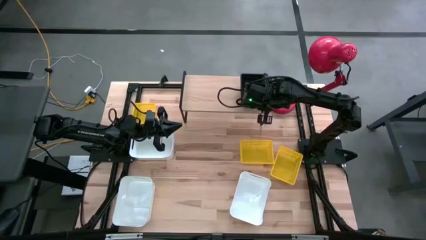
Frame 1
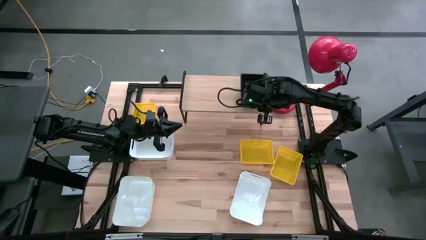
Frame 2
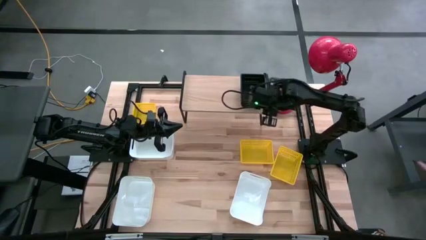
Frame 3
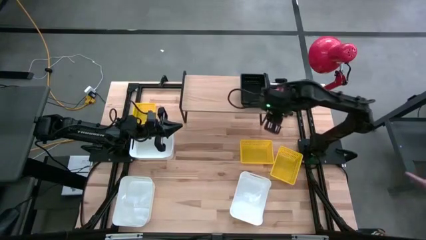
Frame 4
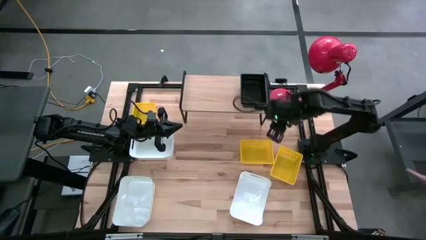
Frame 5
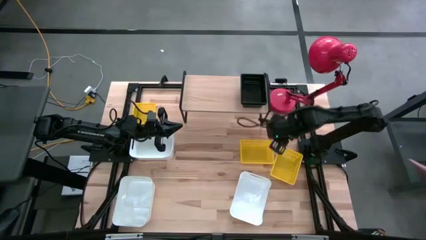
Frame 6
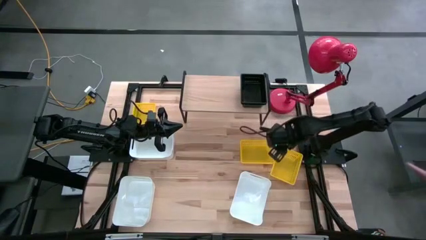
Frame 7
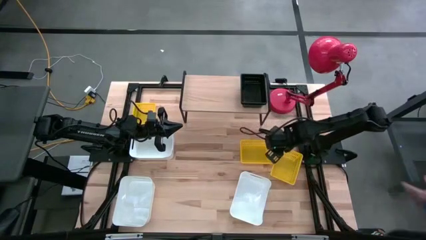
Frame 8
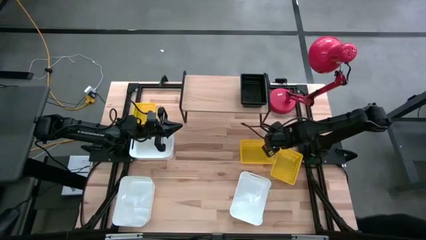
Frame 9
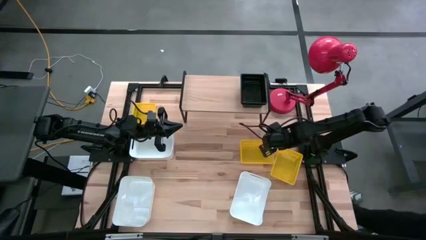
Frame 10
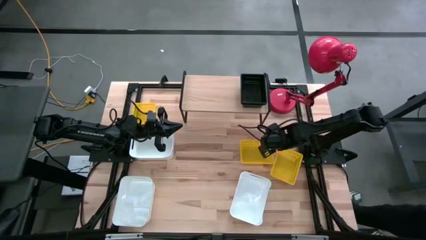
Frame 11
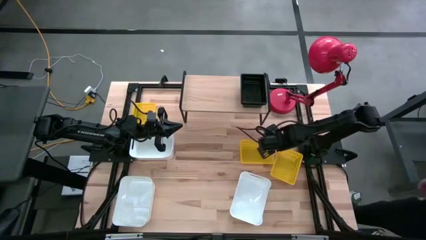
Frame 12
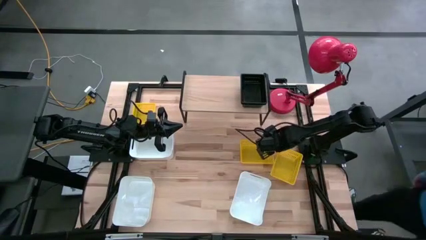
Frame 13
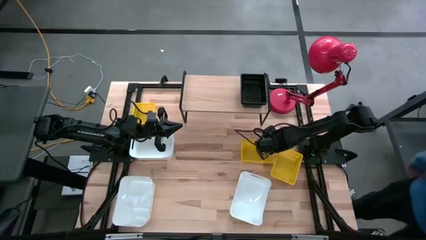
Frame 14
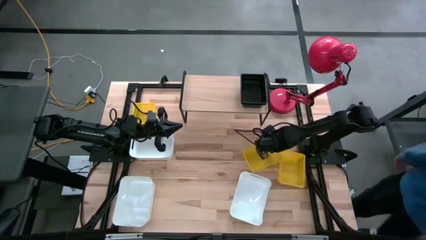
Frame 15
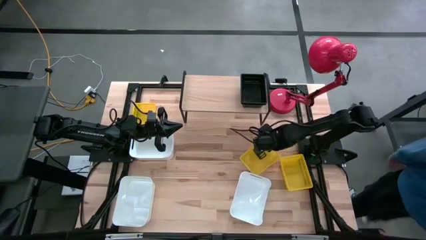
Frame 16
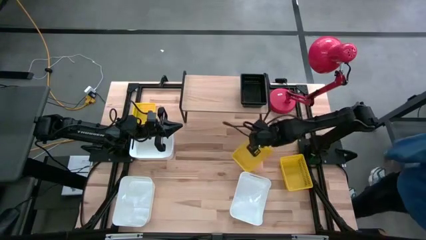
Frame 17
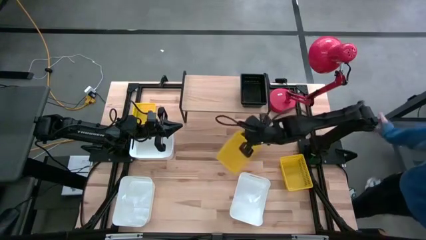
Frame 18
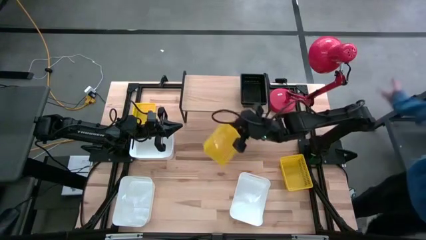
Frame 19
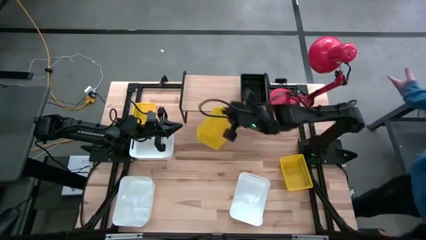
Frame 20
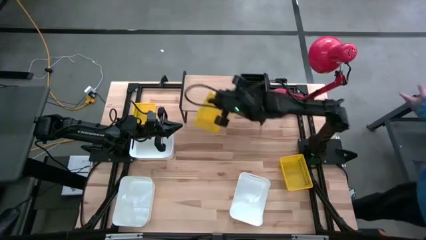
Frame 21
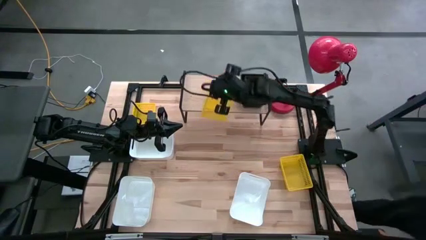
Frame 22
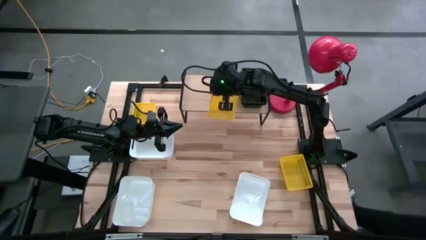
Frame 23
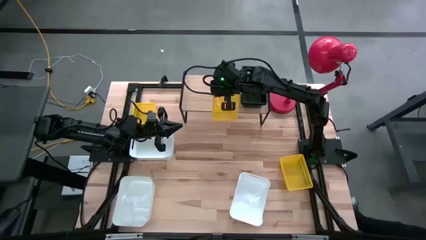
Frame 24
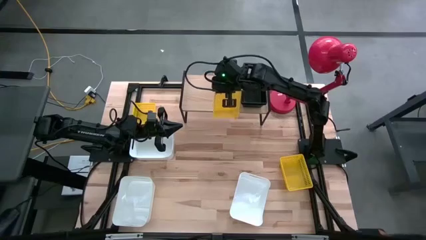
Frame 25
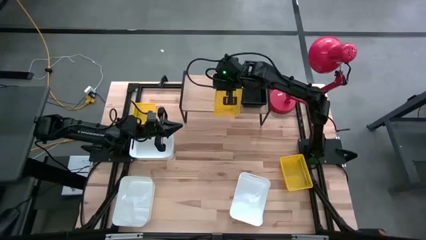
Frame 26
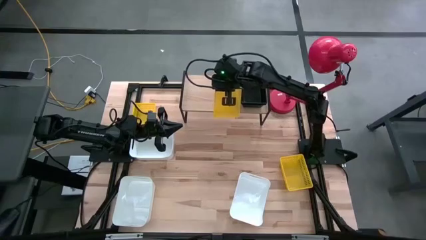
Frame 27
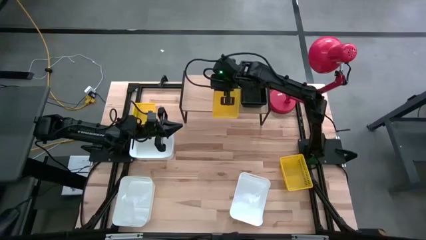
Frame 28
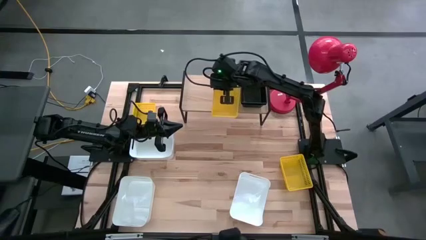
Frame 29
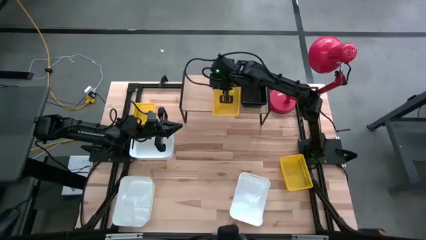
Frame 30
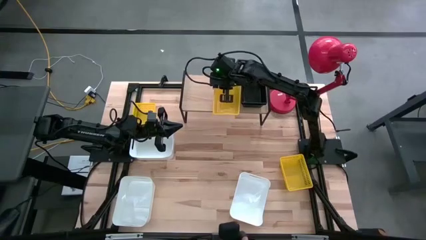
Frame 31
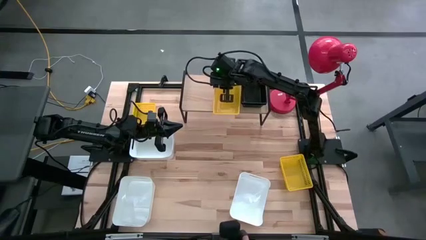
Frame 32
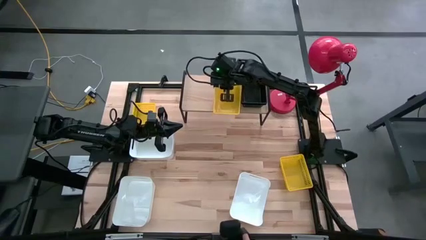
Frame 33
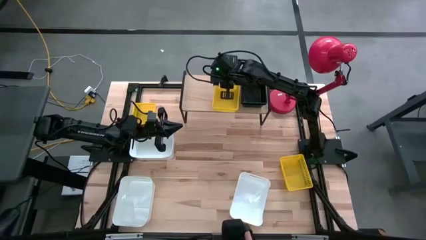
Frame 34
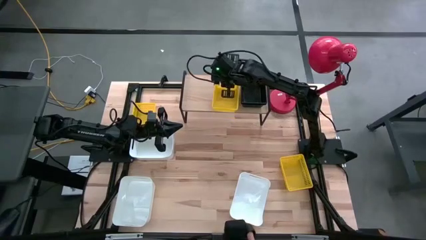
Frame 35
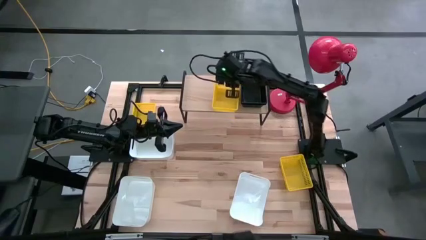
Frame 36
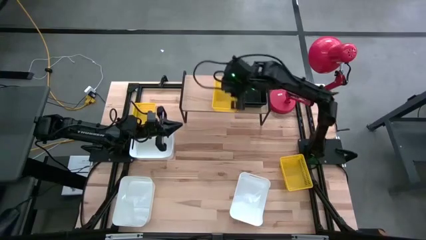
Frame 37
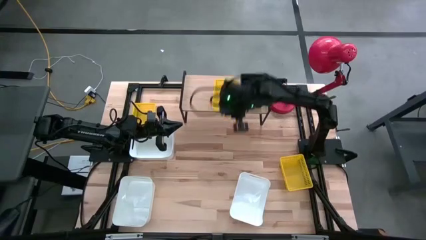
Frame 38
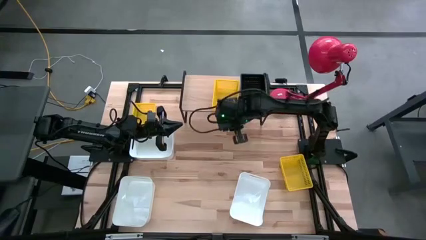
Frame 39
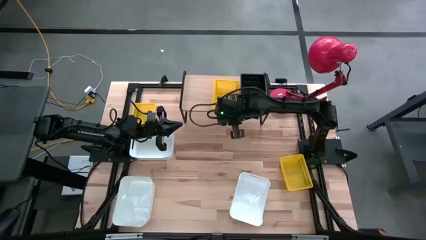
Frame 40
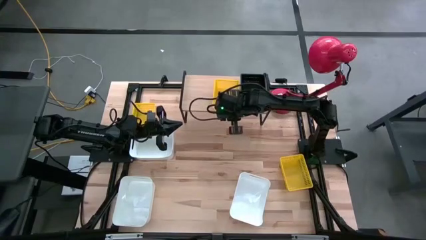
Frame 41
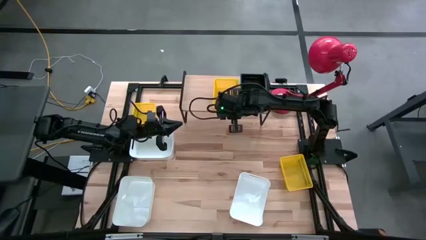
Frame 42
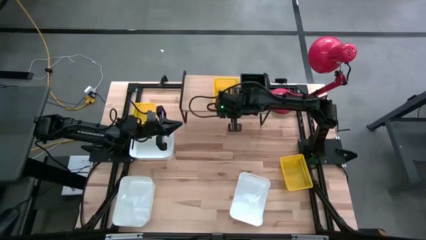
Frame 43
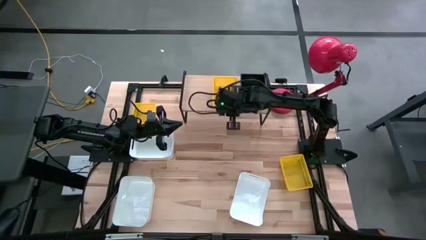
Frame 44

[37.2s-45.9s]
Task: Stack baskets on shelf by color
Put the middle yellow bin on the shelf

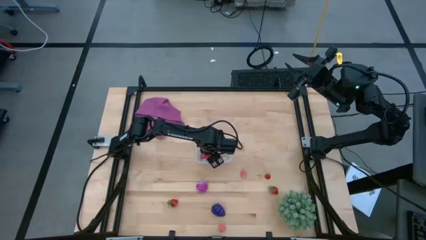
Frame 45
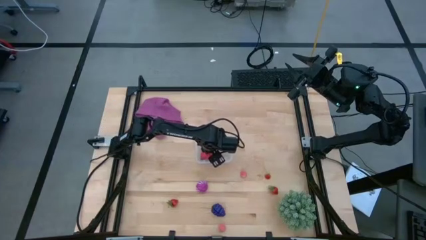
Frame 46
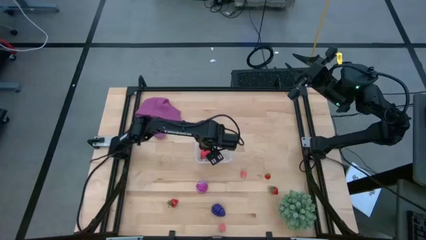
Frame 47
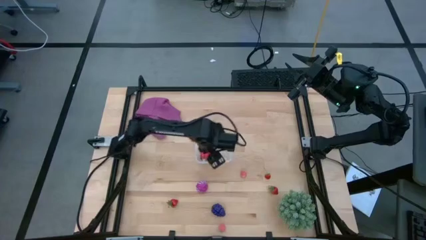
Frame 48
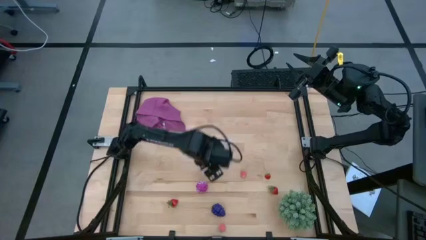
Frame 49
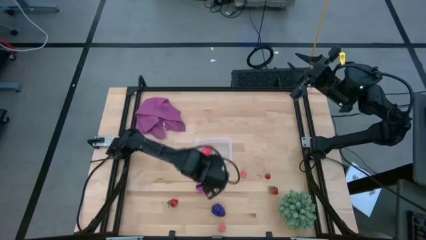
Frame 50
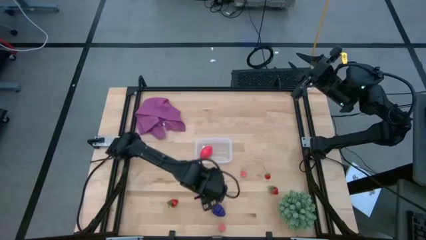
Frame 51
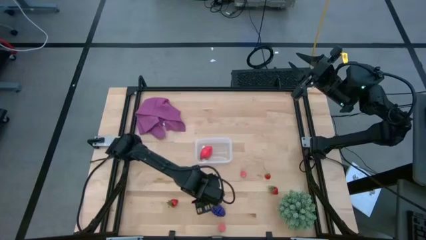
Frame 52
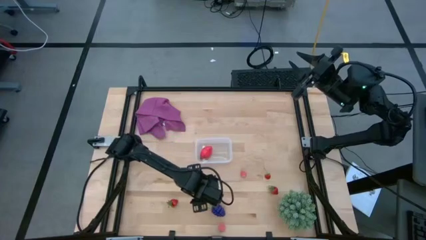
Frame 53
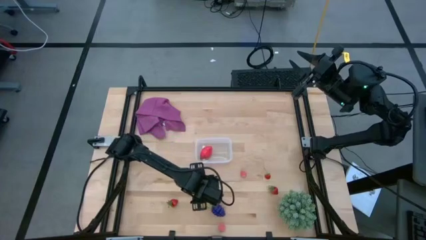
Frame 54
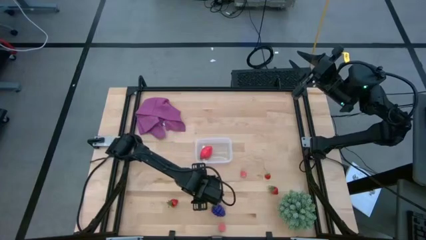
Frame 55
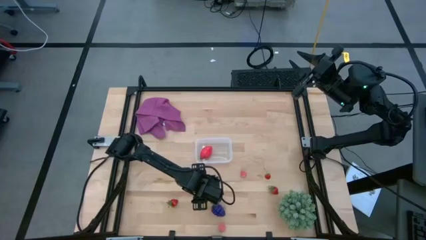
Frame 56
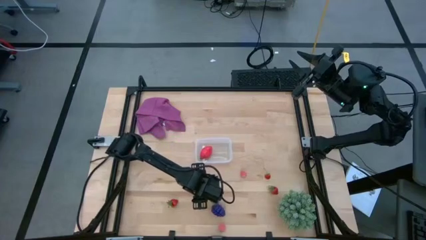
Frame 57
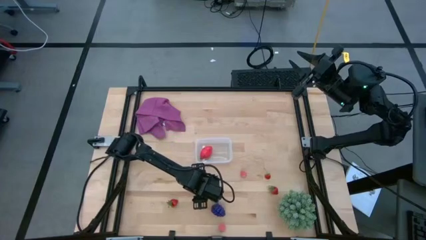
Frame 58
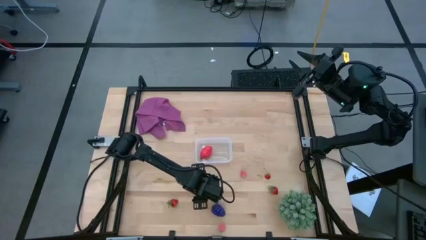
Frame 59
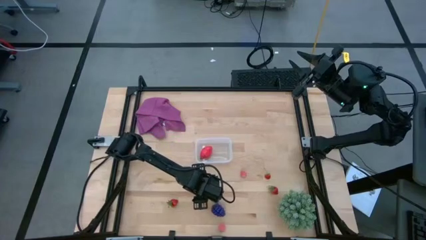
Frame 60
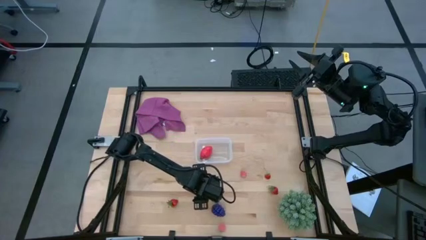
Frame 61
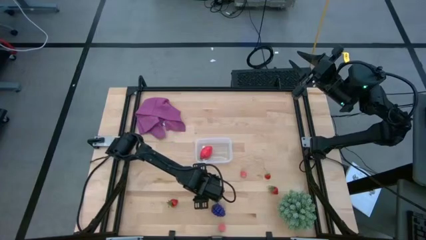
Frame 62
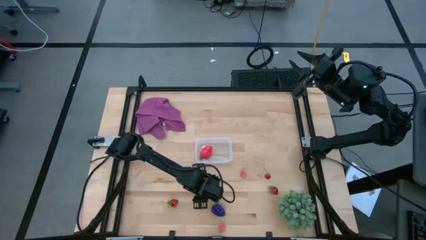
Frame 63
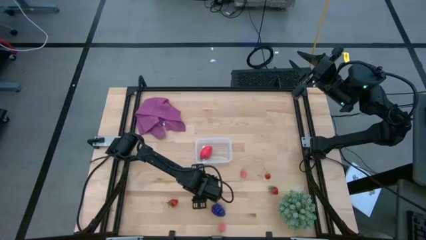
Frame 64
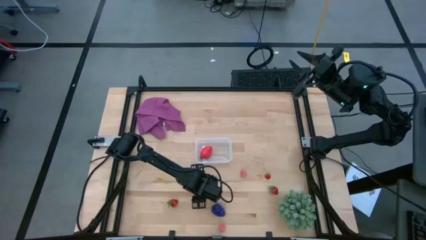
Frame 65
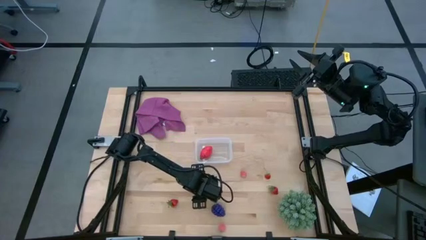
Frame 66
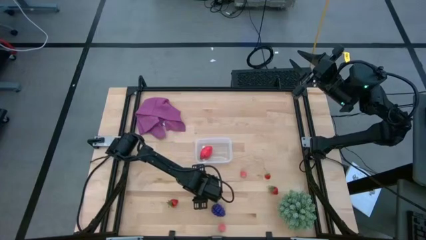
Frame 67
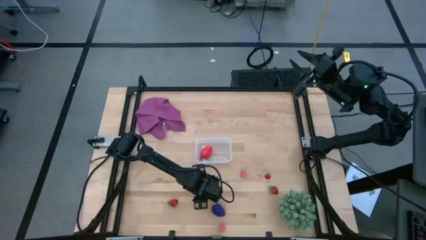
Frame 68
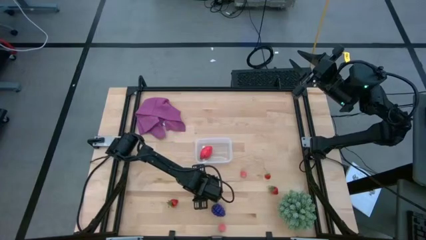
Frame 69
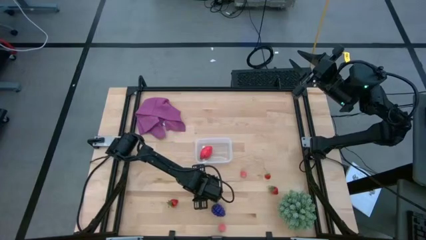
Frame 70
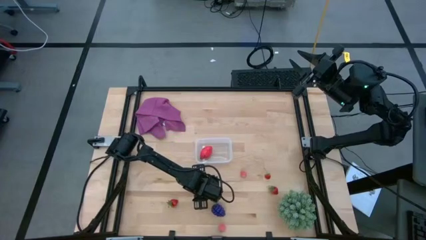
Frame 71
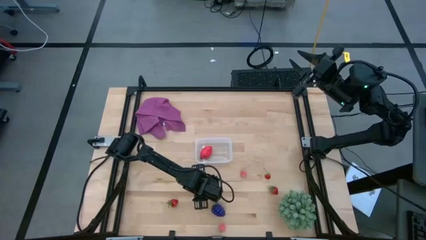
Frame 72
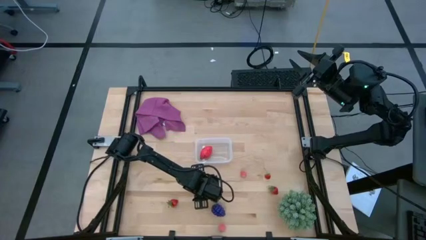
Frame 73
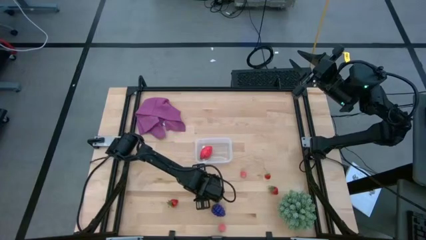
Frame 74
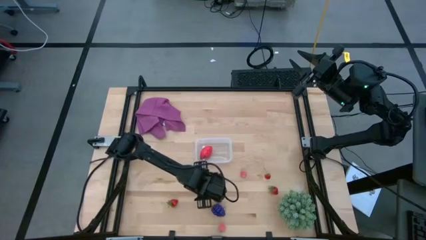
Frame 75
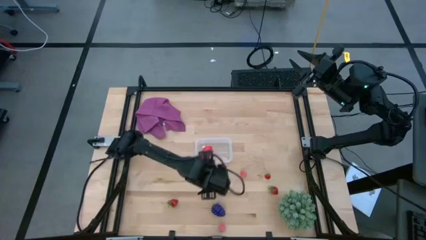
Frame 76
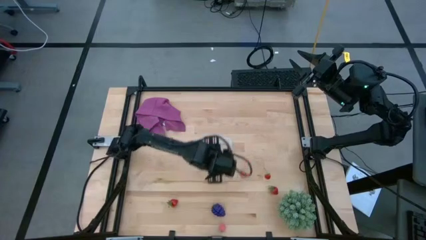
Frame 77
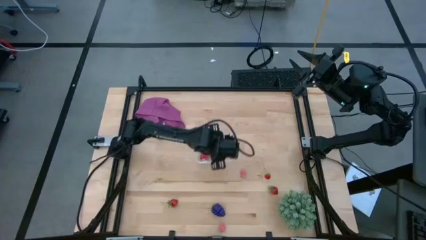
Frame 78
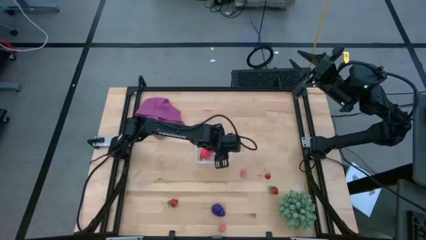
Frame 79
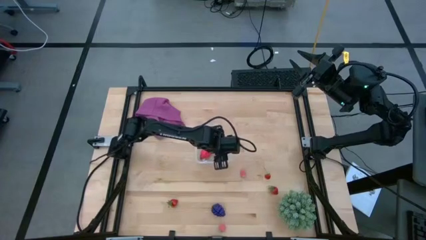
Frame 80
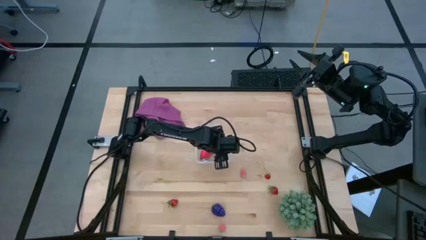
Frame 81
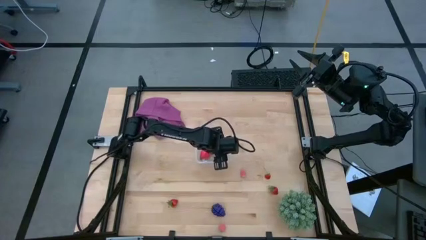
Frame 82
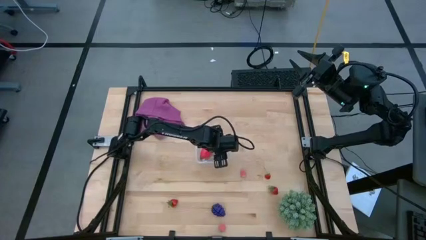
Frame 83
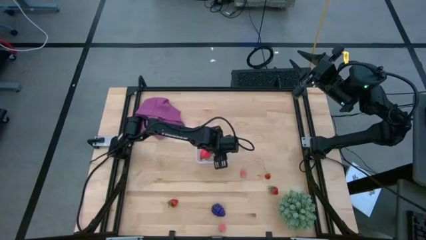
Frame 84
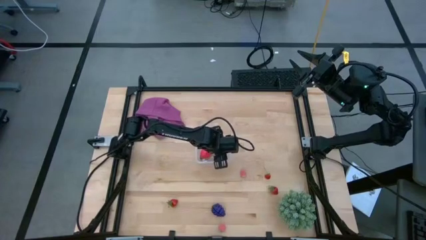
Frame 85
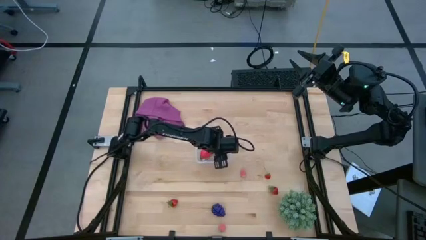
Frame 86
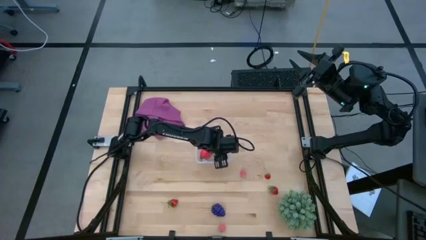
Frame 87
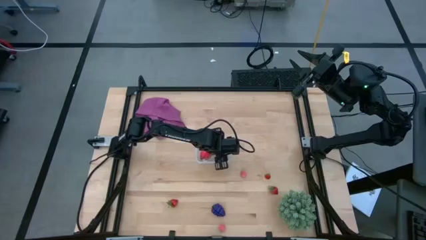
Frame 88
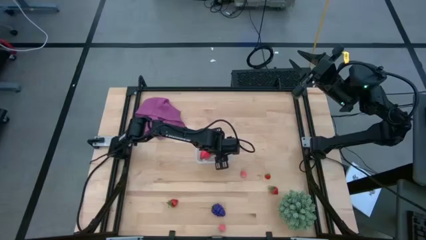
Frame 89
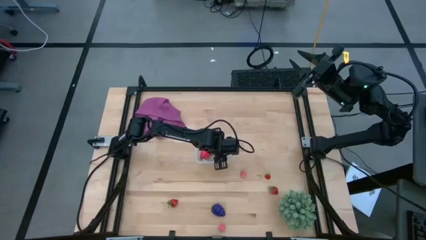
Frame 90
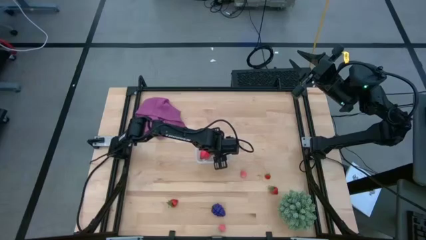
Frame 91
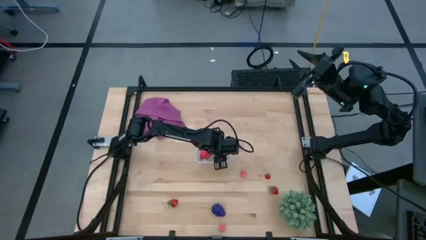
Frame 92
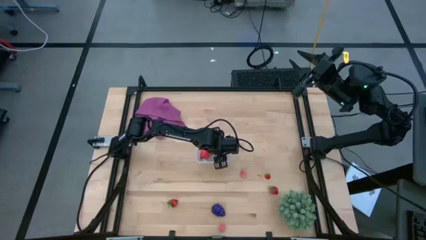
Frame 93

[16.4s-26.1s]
Task: Pick and placing Produce into tupperware
Put the violet onion into the transparent bin
